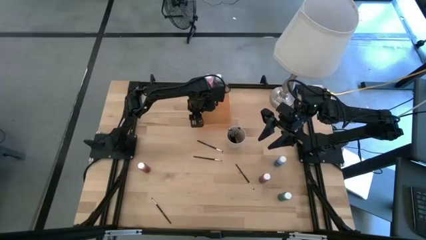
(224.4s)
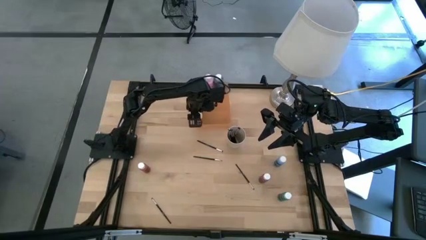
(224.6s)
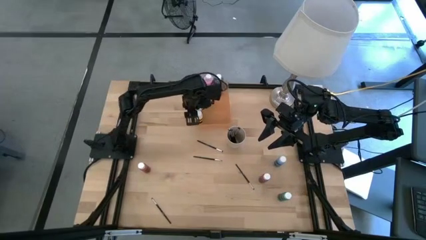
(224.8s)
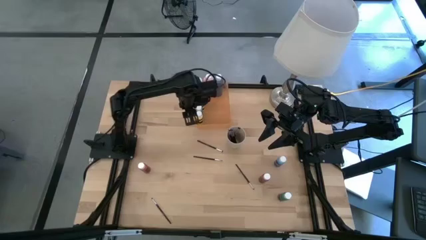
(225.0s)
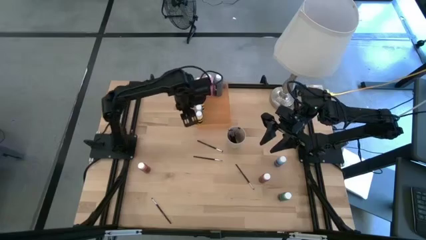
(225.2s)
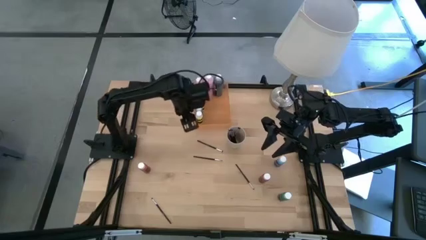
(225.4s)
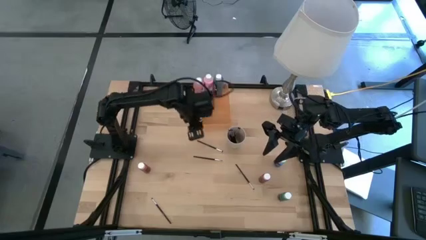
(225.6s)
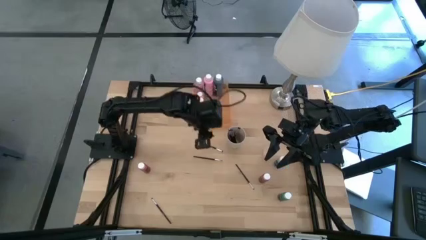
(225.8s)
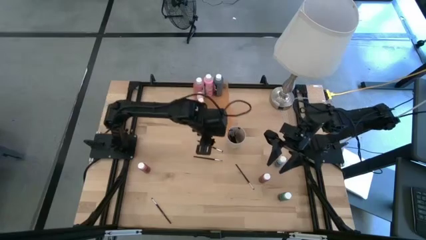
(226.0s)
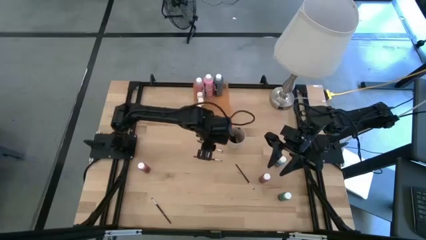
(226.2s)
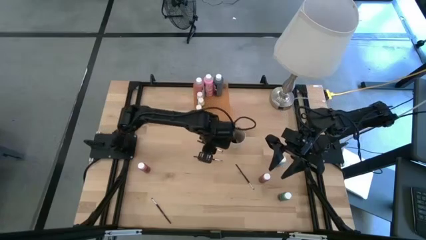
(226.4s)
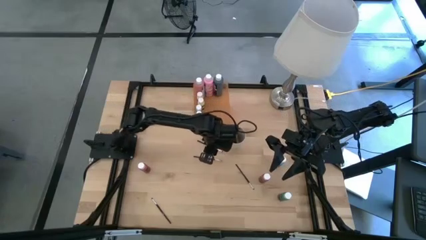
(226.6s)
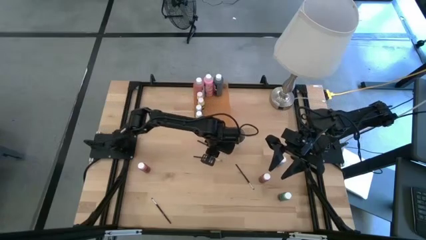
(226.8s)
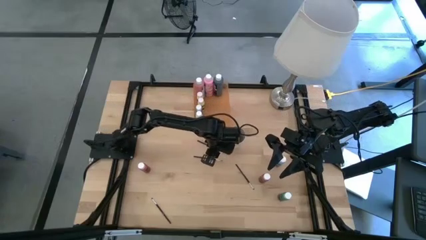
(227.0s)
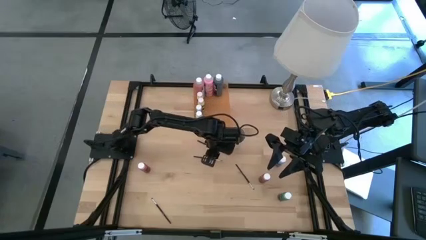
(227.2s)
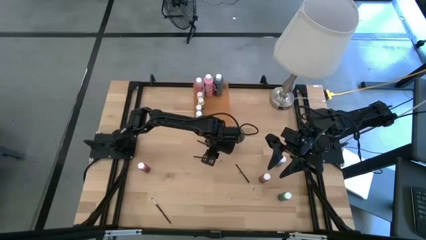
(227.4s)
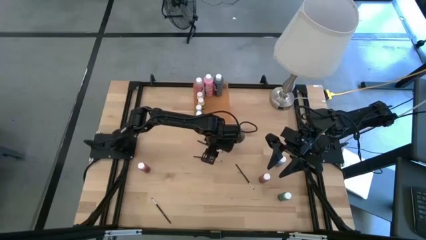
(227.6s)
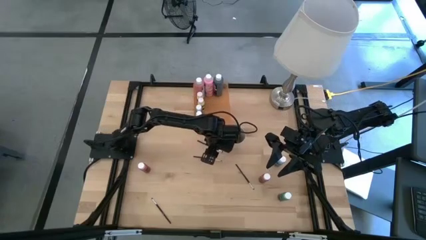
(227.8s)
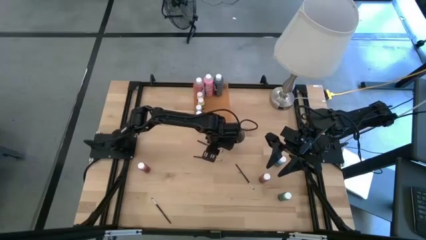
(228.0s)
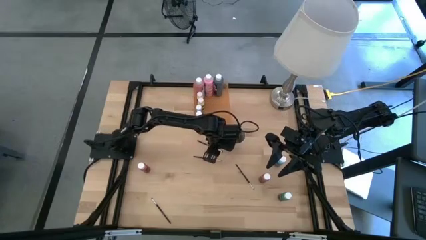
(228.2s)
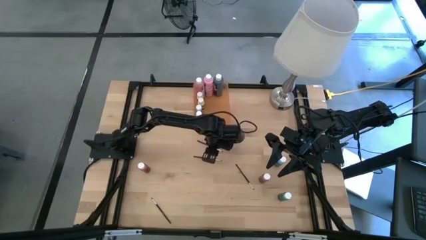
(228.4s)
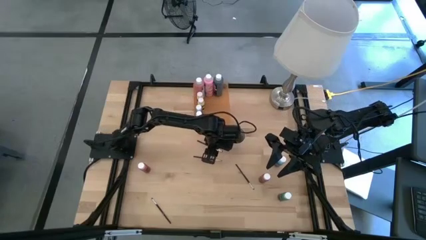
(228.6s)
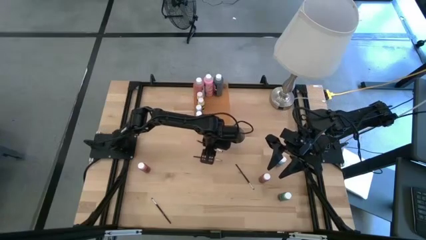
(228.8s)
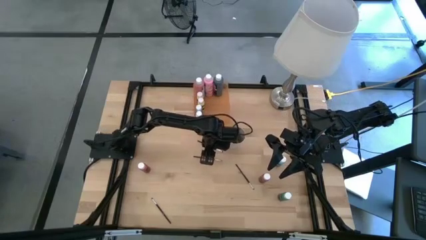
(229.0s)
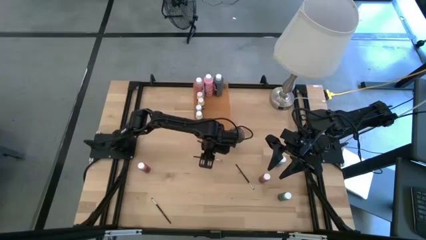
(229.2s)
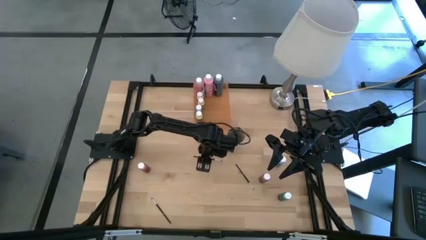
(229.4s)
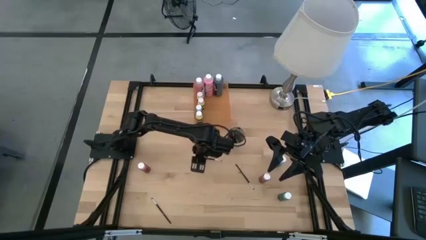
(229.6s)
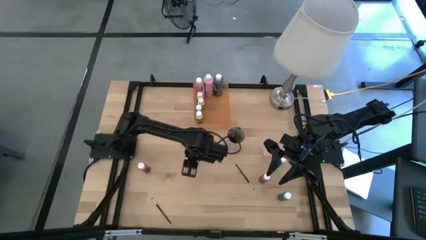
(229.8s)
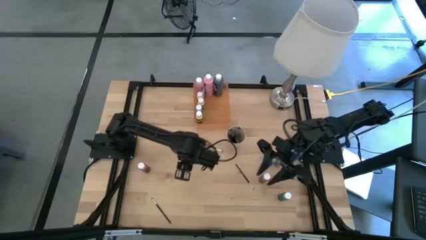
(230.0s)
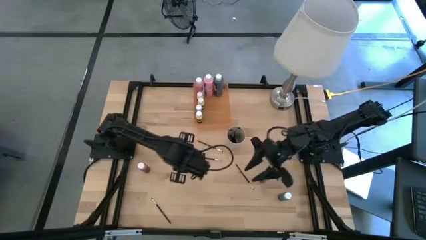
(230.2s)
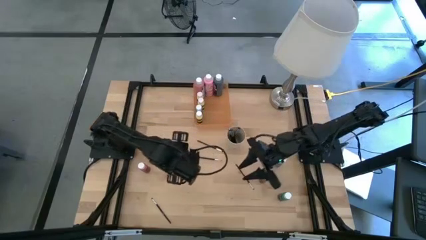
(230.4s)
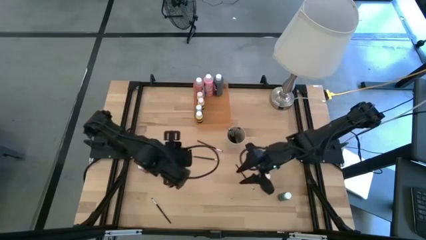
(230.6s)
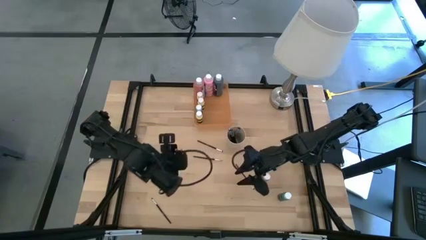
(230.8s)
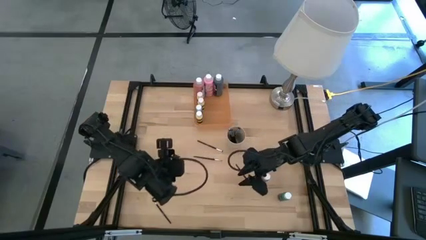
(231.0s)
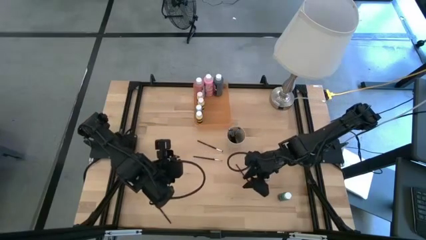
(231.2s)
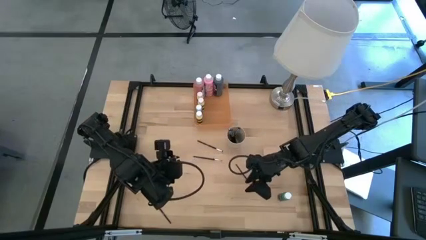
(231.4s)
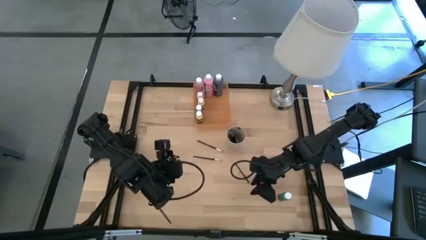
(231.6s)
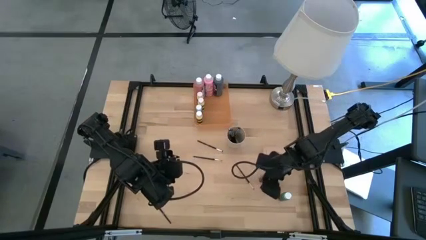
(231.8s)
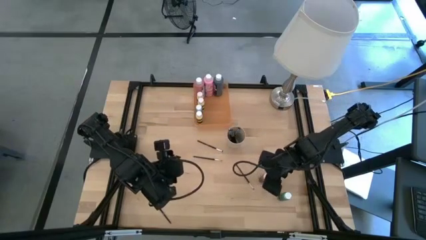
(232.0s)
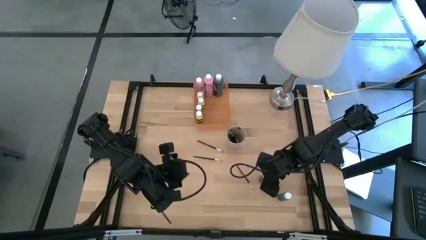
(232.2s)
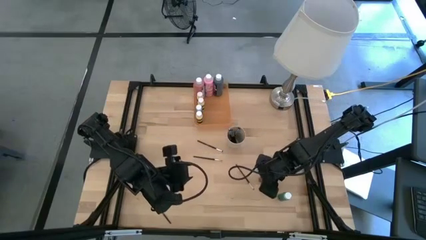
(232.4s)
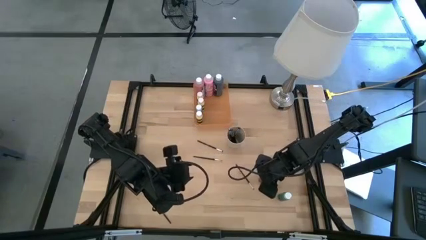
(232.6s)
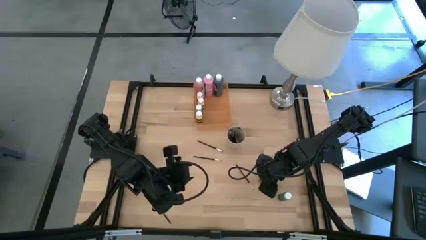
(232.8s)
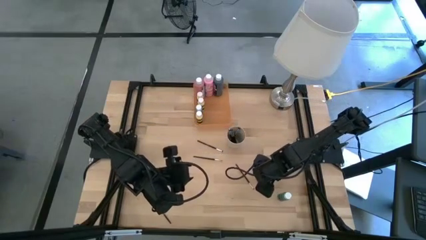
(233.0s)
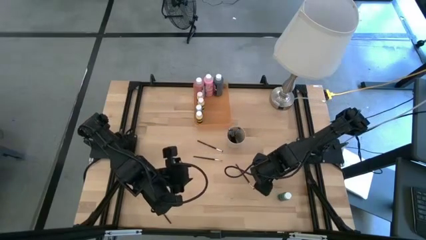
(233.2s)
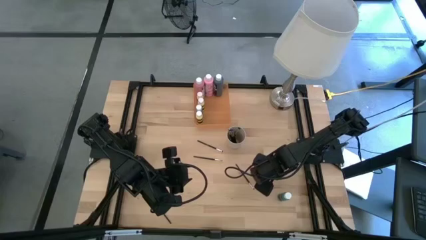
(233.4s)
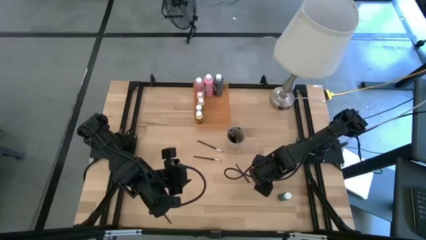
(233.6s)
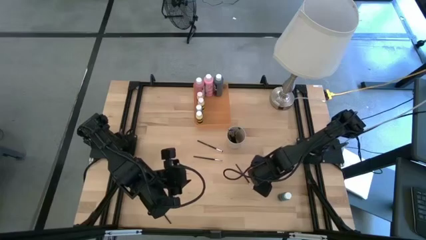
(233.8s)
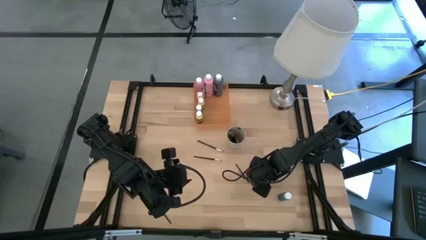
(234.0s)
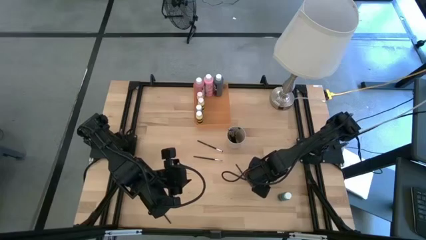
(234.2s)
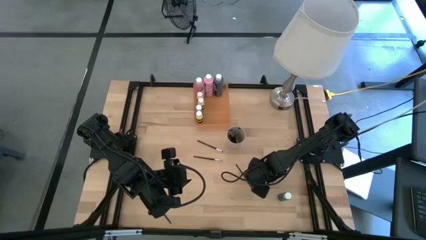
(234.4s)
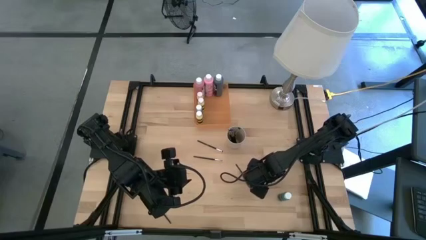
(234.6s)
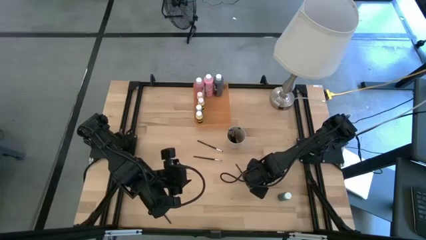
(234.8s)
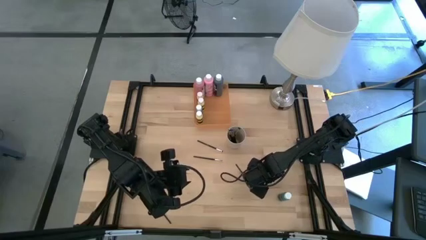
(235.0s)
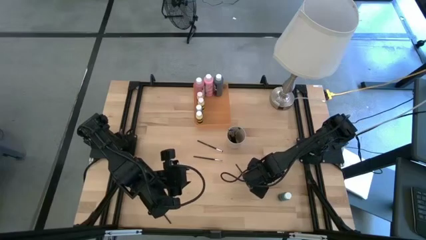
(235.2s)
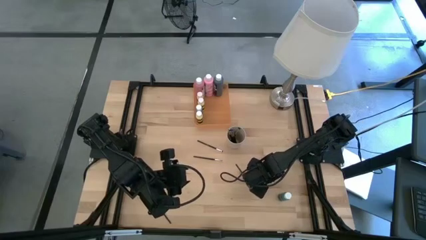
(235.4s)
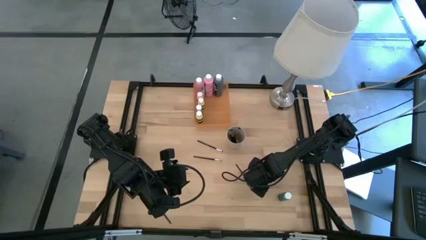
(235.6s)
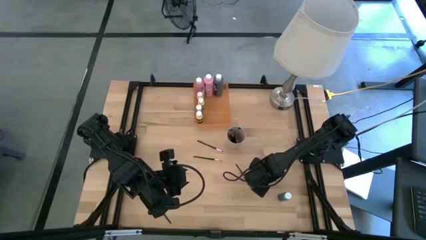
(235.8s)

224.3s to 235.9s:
Task: Pick & Place Paint Supplies
Put the small pink paint bottle into the orange bin

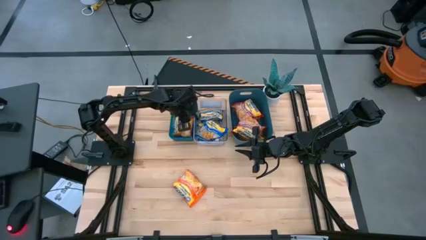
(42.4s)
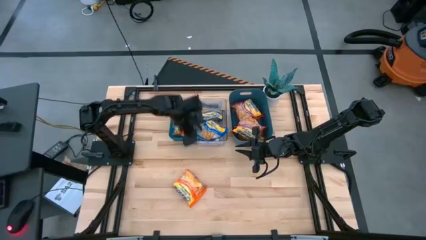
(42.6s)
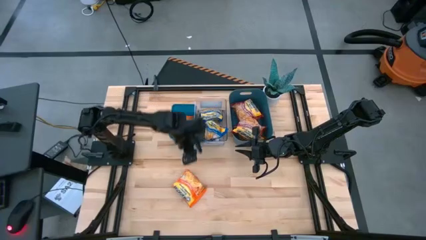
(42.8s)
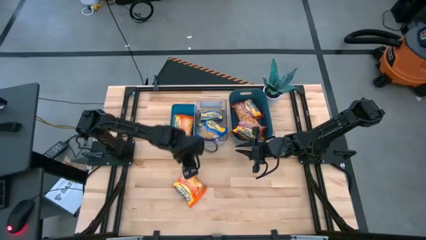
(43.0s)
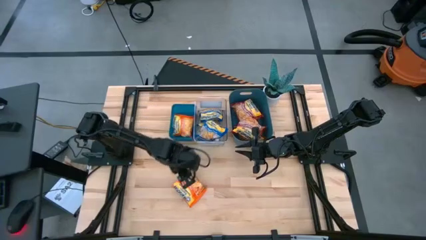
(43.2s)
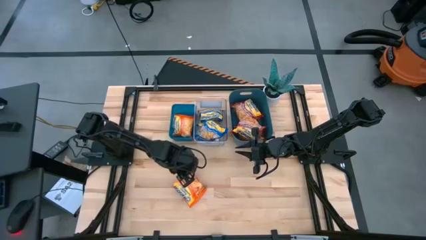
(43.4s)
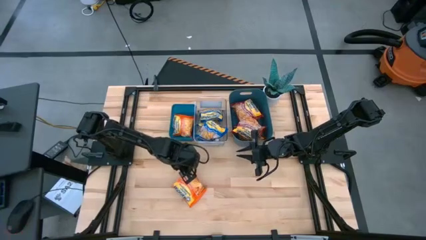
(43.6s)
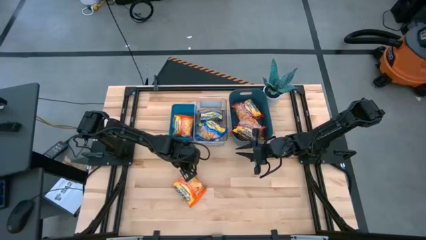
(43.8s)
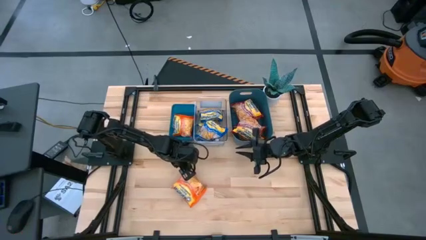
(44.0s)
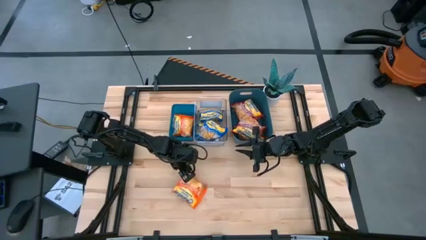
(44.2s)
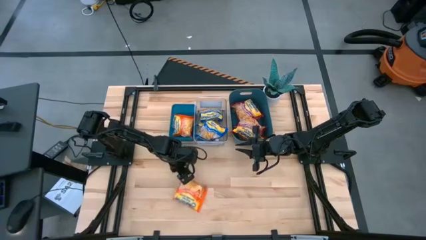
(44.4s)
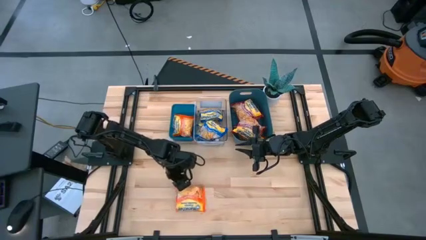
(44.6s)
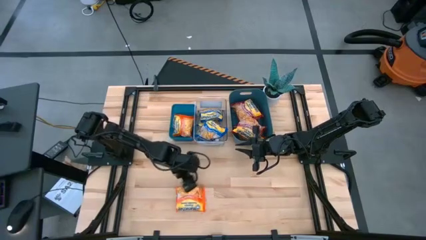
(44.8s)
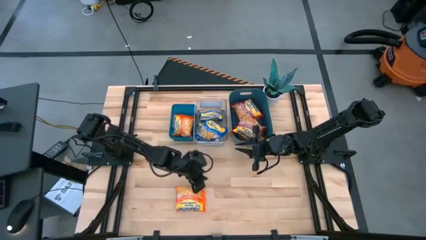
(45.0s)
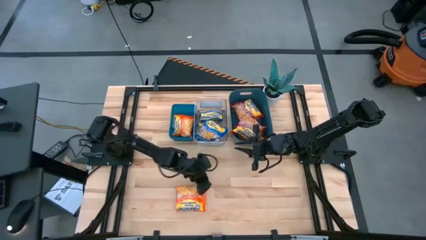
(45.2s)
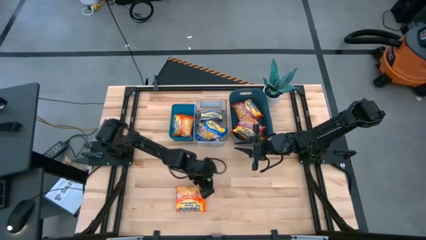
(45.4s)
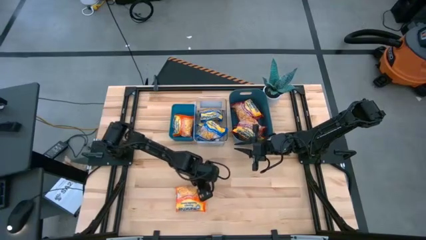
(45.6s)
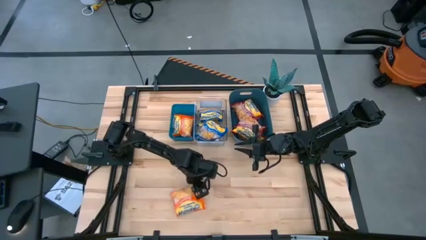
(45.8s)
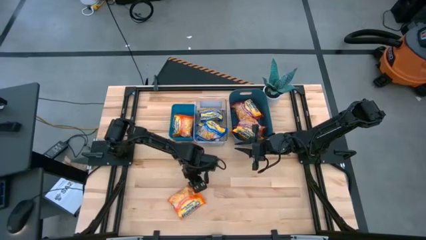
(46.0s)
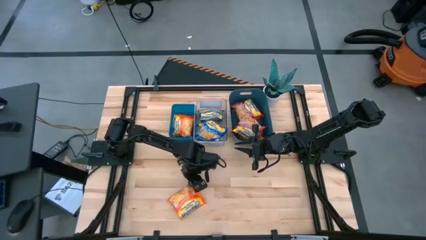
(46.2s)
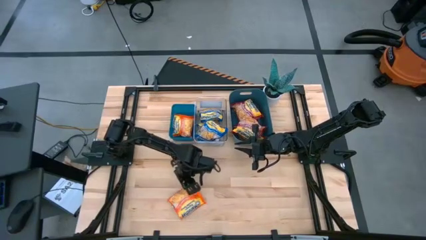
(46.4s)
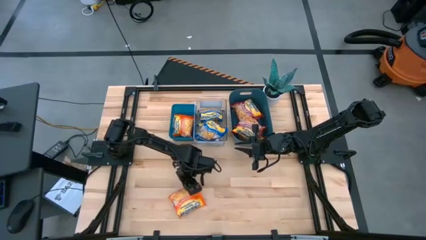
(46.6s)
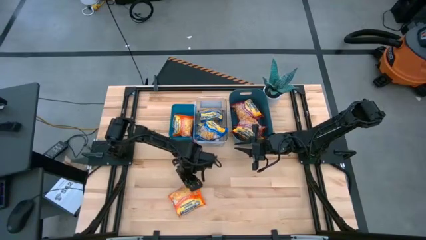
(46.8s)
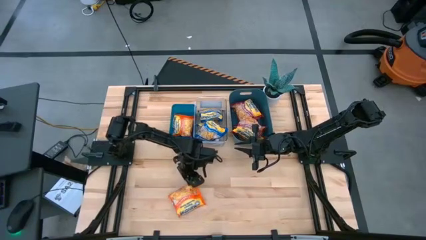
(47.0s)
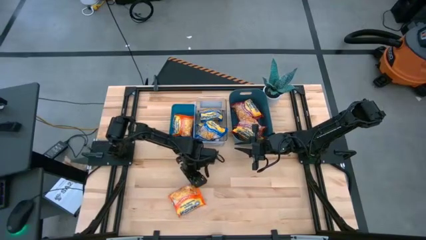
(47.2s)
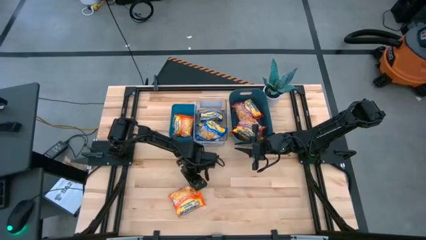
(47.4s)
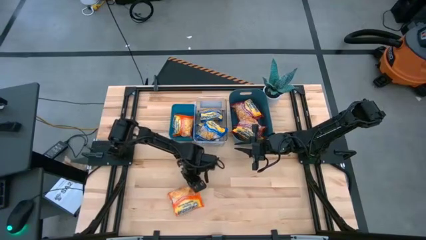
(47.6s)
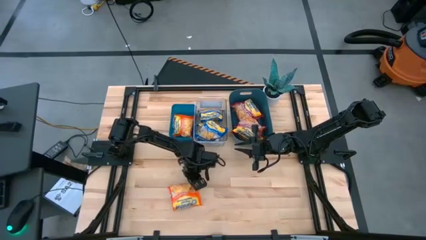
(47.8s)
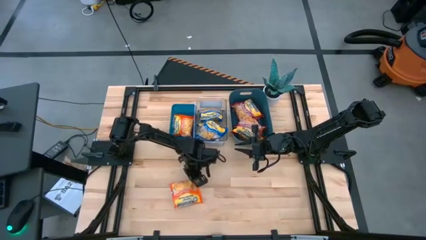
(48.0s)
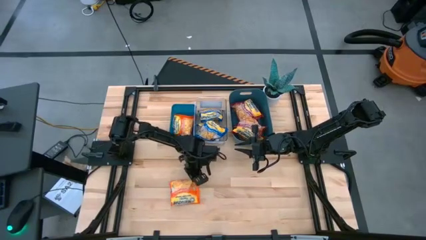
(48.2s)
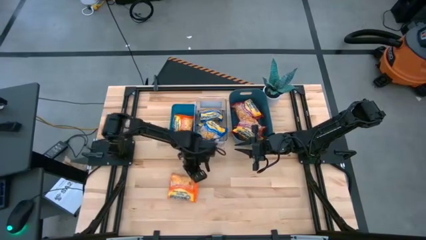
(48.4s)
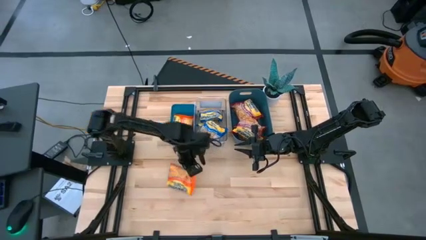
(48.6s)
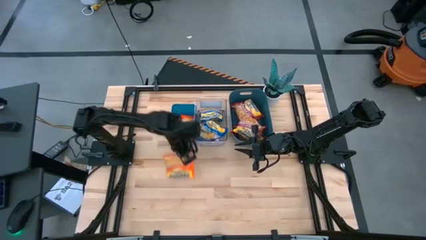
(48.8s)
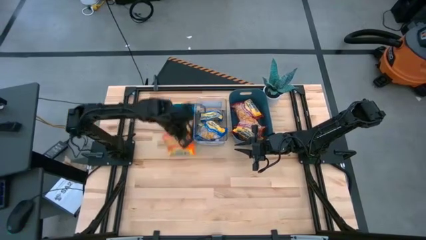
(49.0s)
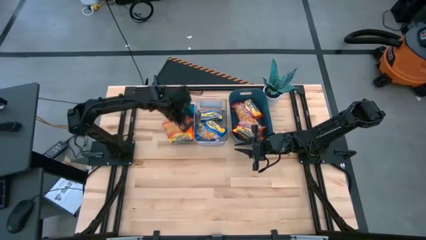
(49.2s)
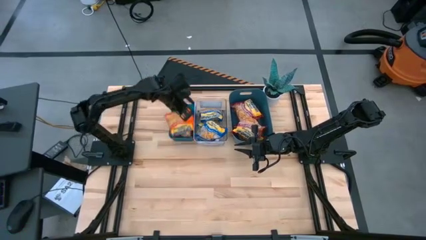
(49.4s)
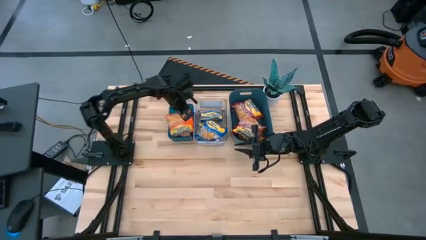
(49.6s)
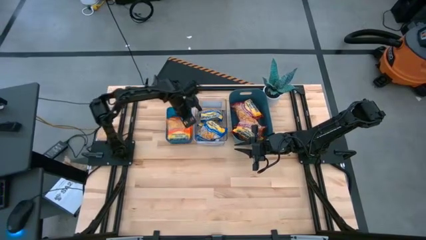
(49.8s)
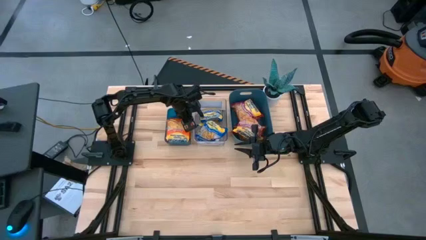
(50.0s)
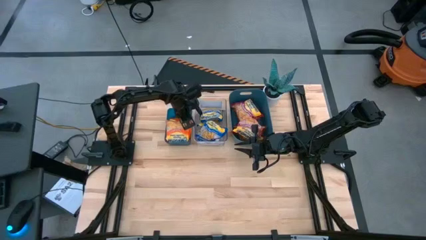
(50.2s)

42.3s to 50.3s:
Task: Sort Maruchan noodles
Put the orange noodle pack into the blue bin
